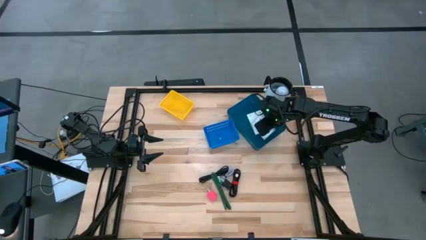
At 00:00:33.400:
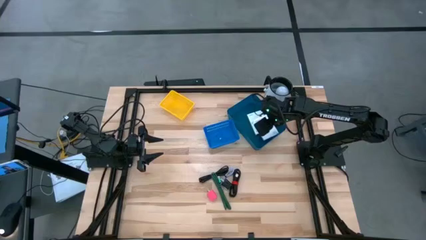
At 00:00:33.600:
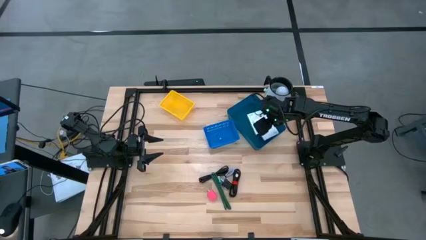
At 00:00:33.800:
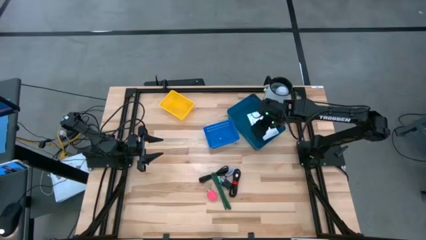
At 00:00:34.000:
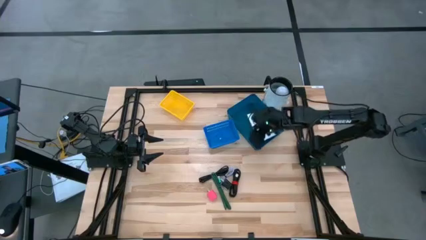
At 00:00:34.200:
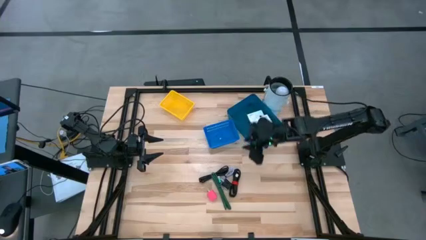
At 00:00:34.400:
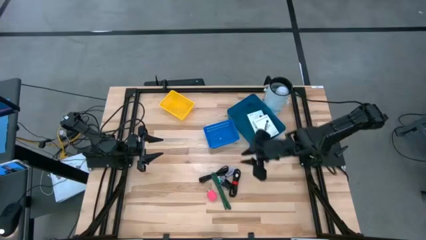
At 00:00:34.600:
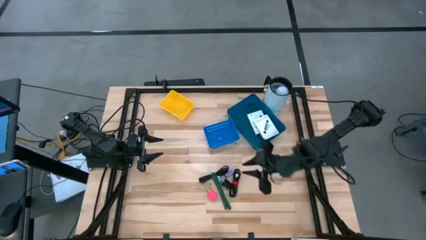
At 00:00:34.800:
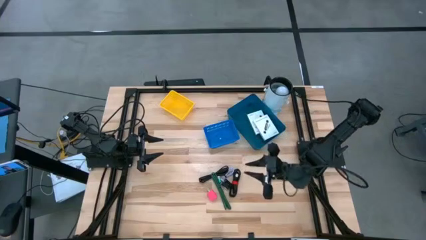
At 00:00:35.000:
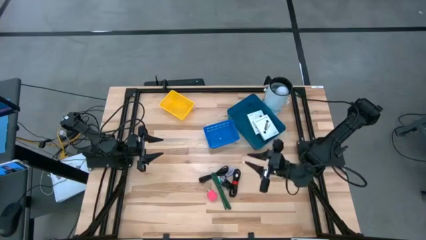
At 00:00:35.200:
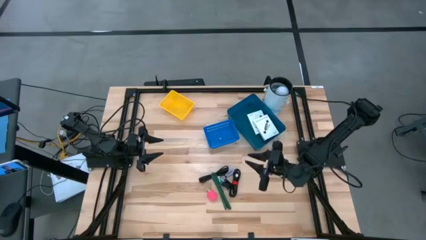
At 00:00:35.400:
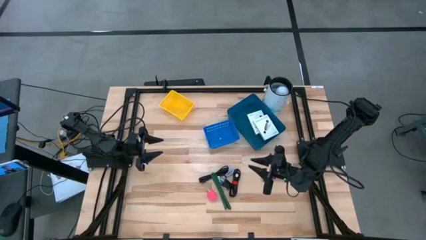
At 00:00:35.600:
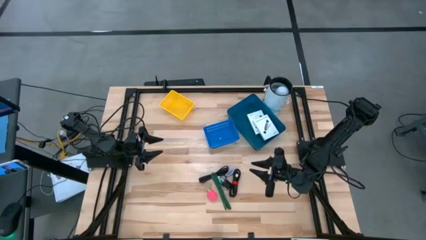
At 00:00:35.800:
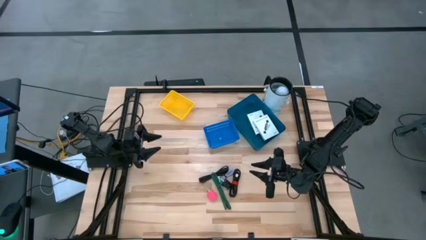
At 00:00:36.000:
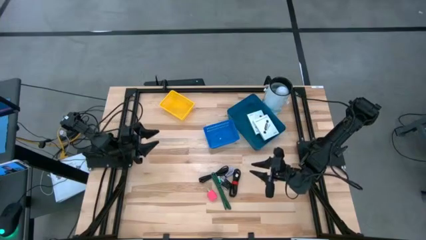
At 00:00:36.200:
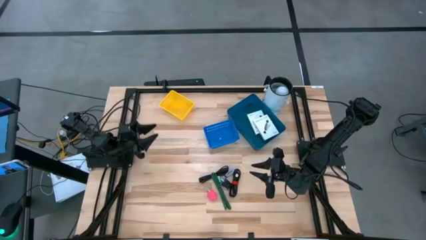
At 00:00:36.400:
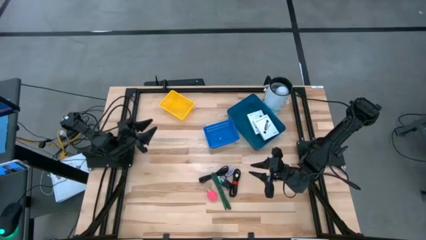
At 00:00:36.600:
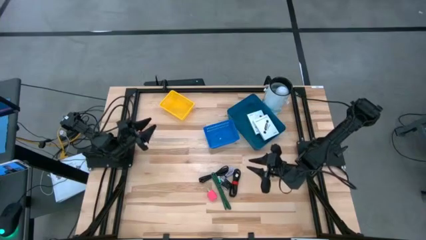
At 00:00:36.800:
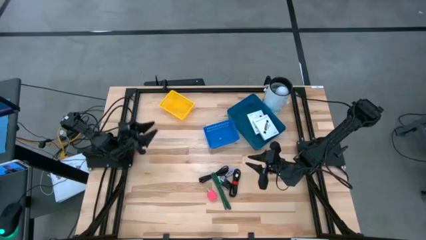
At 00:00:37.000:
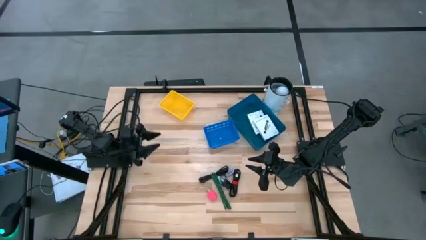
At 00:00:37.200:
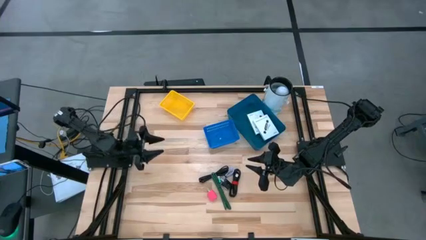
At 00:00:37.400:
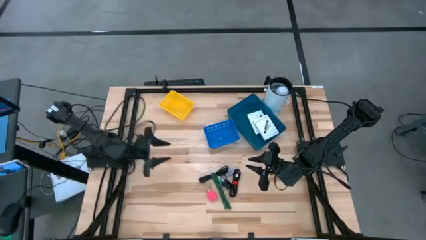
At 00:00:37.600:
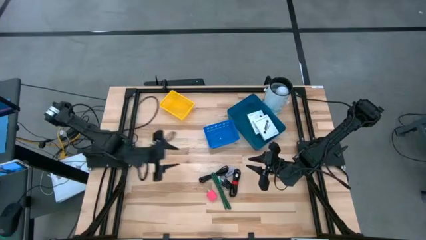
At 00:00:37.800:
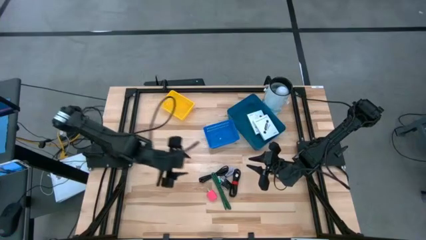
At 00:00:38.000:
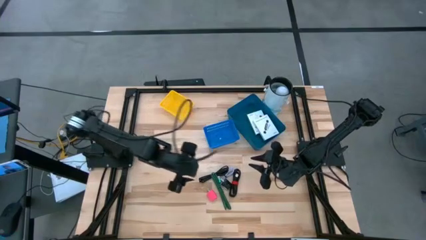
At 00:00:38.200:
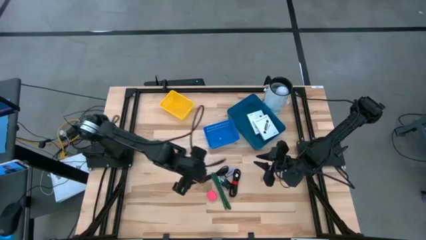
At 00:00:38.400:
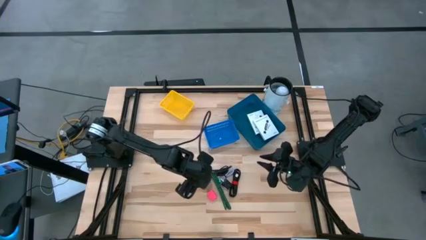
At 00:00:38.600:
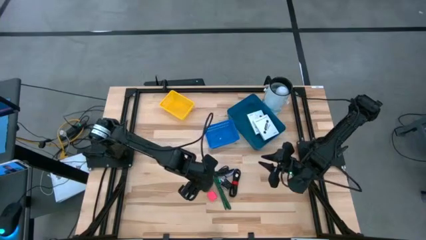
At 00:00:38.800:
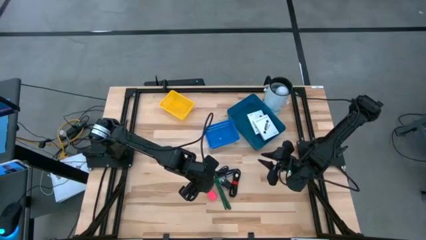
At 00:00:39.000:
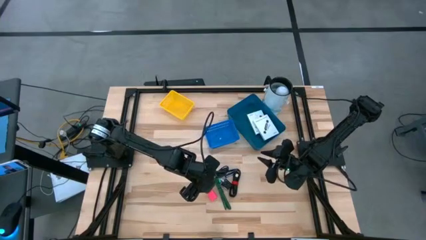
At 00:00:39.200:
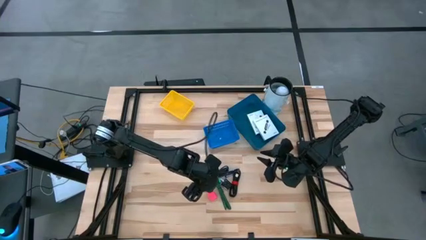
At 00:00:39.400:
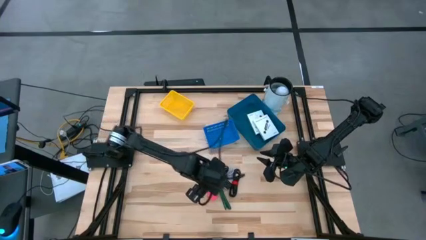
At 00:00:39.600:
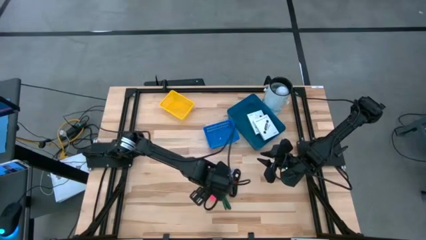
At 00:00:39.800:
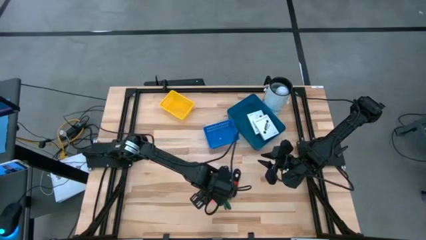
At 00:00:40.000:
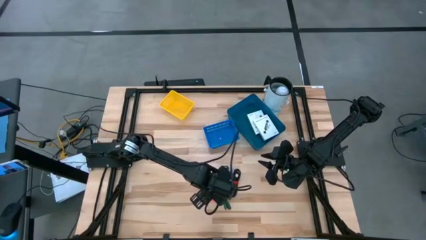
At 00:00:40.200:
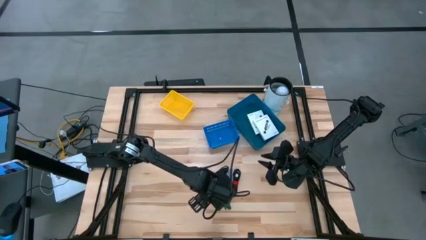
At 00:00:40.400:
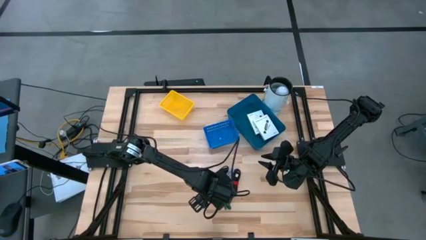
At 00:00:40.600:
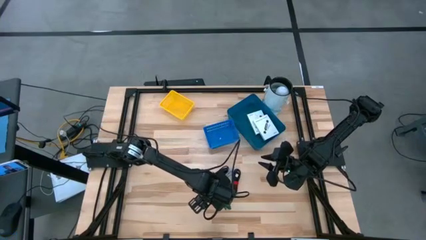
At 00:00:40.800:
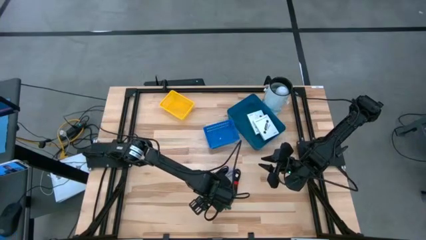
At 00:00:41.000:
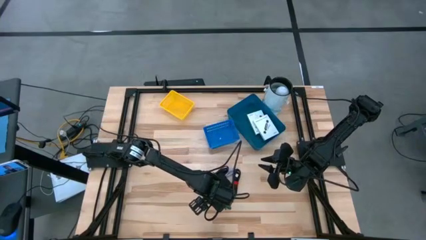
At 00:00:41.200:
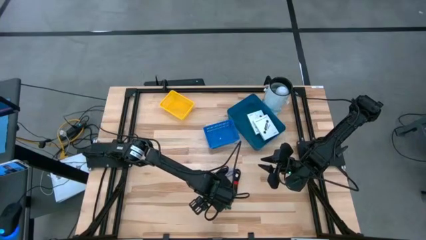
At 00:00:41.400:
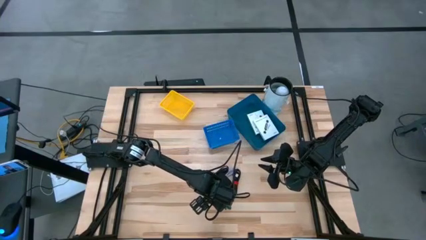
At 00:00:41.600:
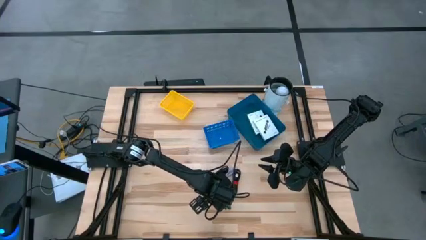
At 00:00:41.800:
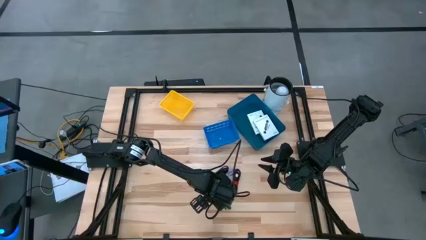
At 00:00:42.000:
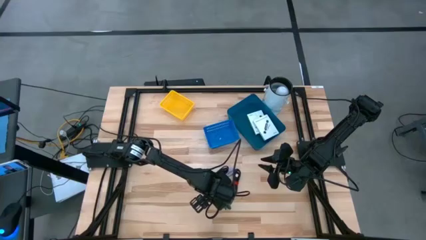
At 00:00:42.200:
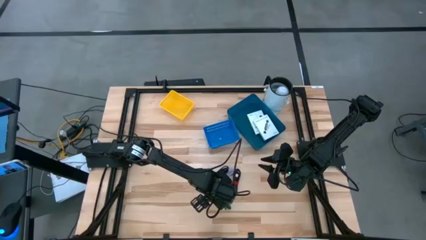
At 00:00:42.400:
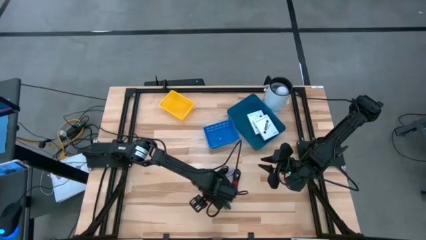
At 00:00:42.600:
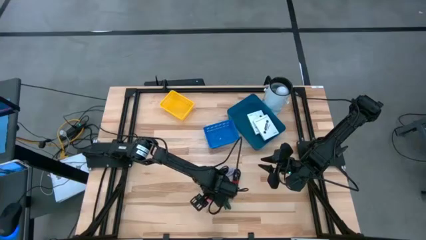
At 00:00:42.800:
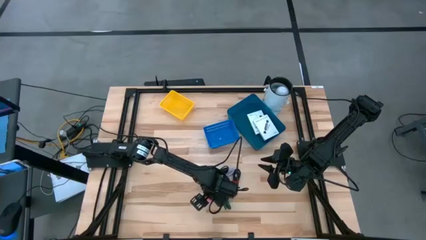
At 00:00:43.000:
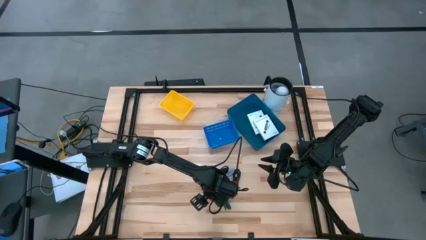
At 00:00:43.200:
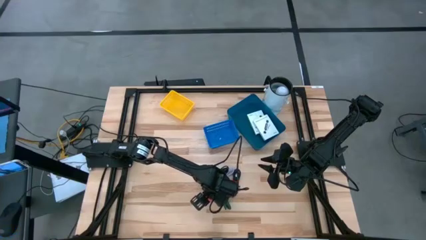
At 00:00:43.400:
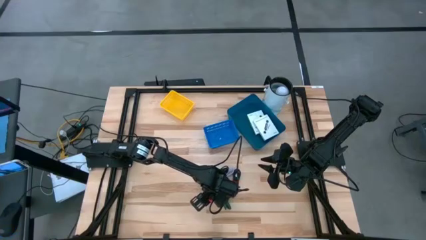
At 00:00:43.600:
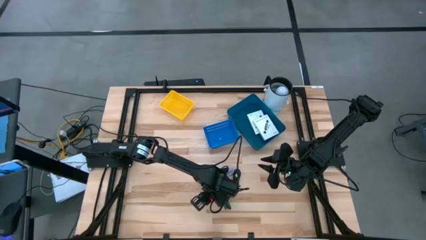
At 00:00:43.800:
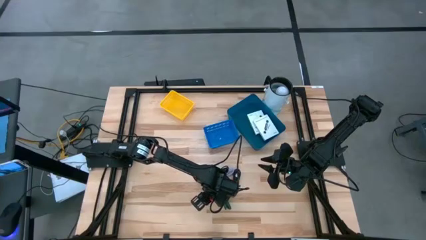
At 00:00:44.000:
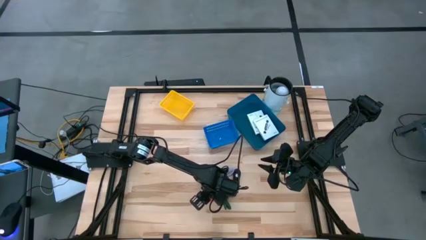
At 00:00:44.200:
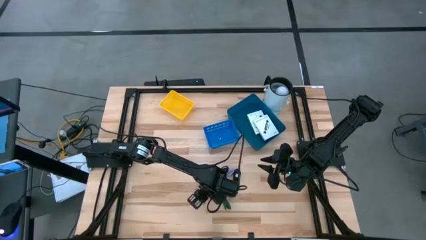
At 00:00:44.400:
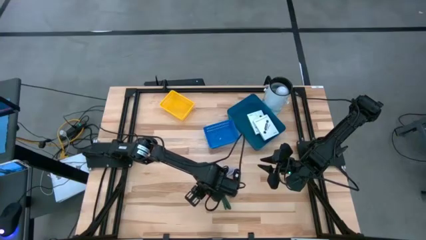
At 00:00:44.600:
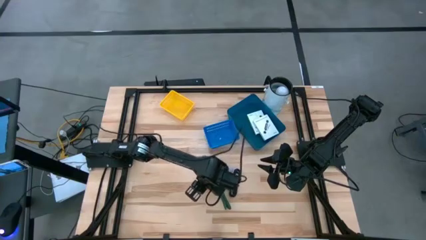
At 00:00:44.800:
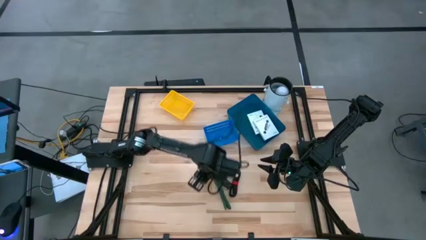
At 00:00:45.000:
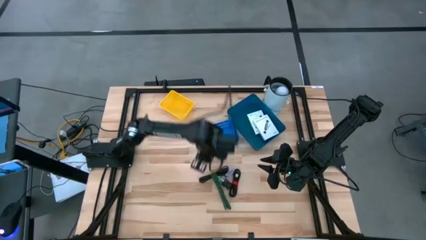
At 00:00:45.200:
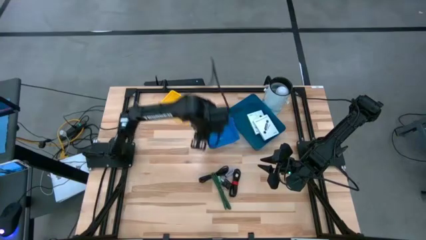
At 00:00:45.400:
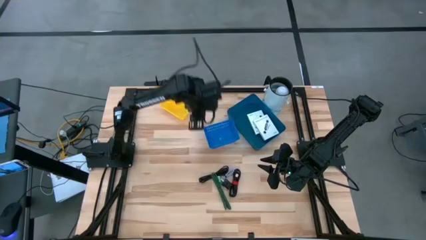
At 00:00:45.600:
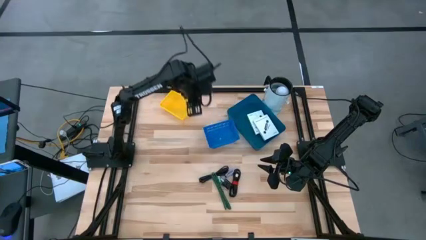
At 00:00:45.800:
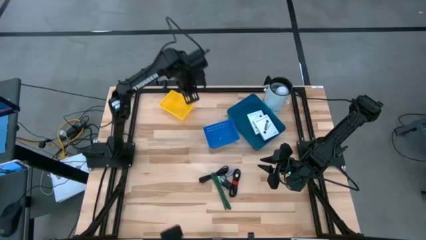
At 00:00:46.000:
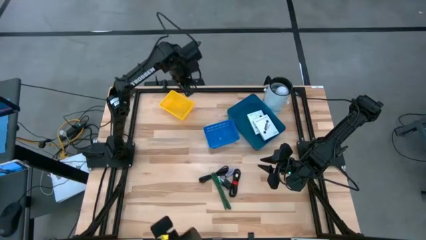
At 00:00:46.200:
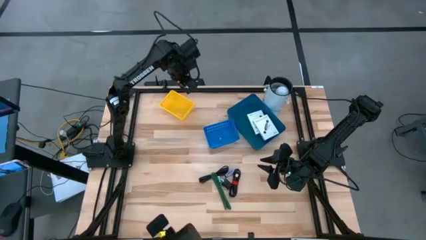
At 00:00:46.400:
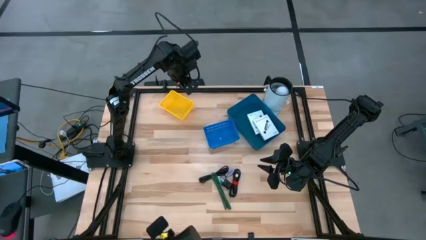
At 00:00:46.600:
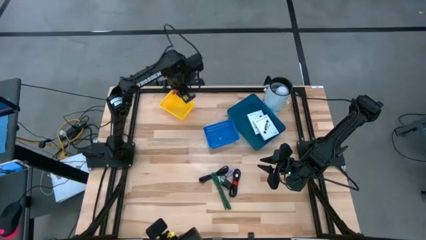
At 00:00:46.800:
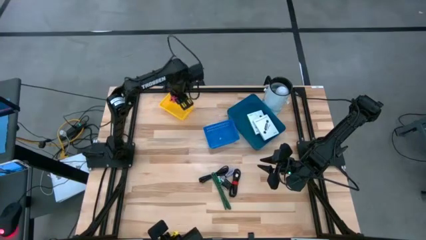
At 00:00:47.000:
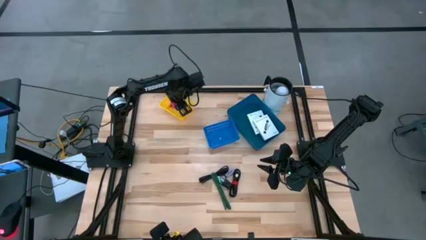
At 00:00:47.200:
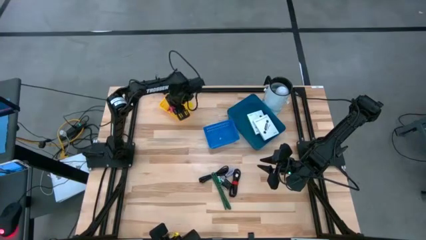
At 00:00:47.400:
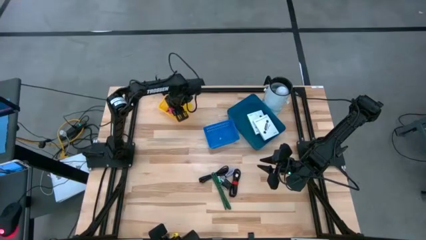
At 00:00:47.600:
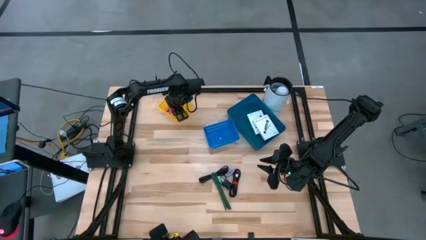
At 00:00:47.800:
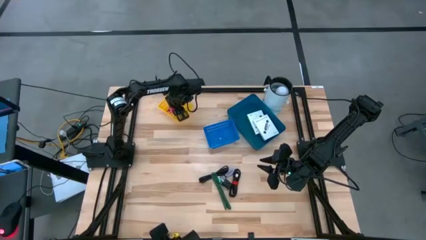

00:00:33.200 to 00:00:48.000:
Task: Pick and place items into bin
Put the pink charger adapter into the yellow bin
